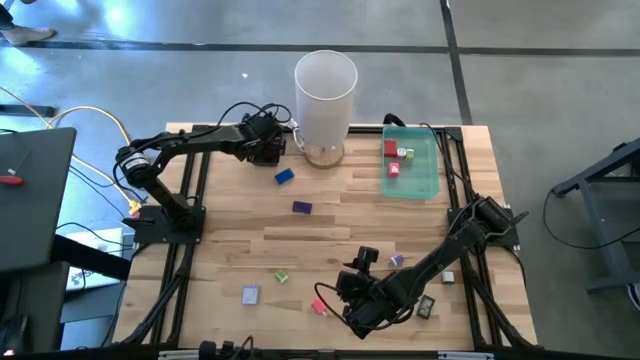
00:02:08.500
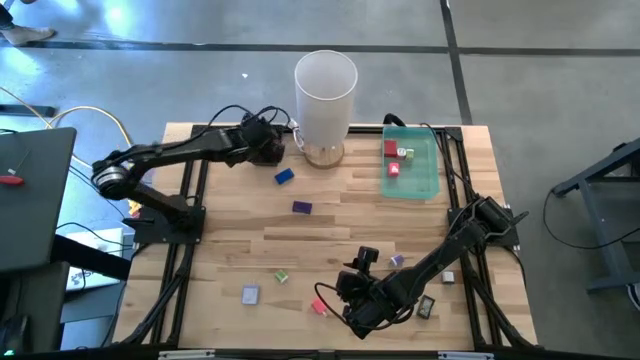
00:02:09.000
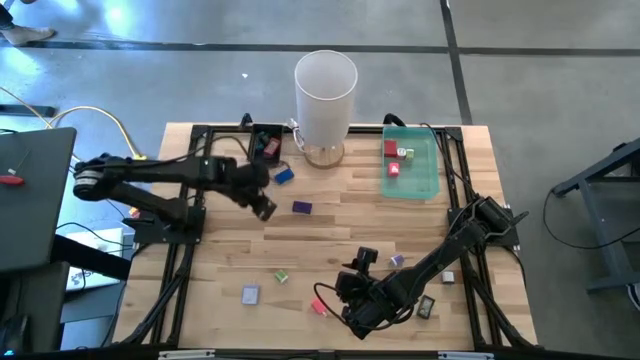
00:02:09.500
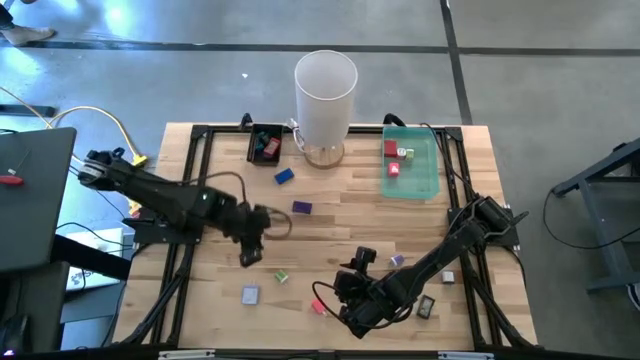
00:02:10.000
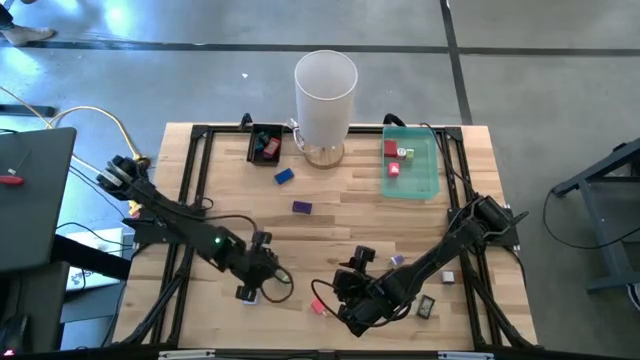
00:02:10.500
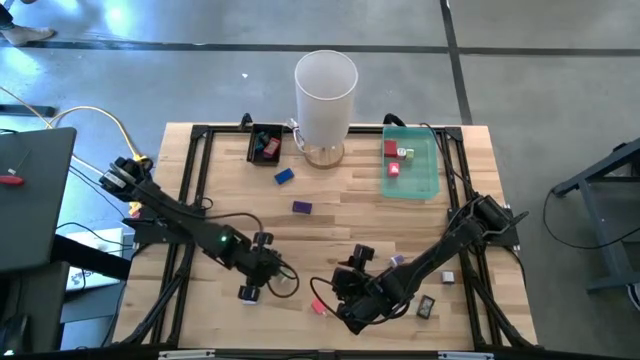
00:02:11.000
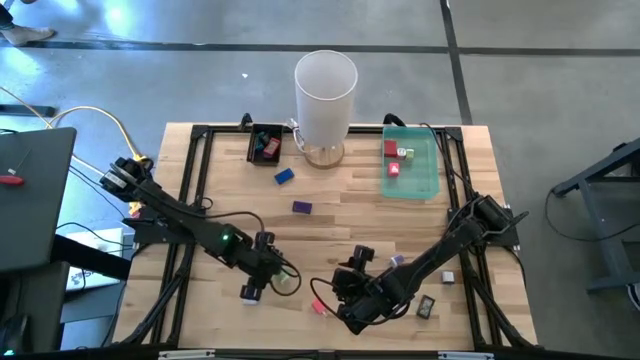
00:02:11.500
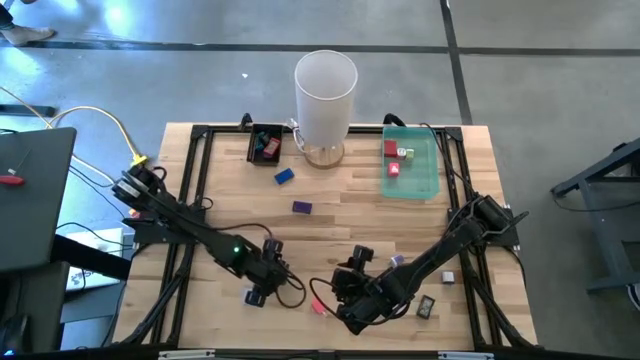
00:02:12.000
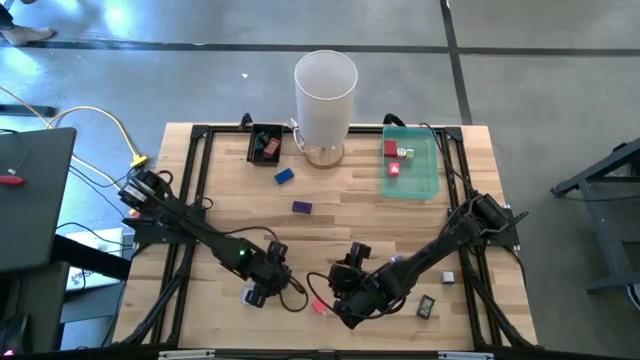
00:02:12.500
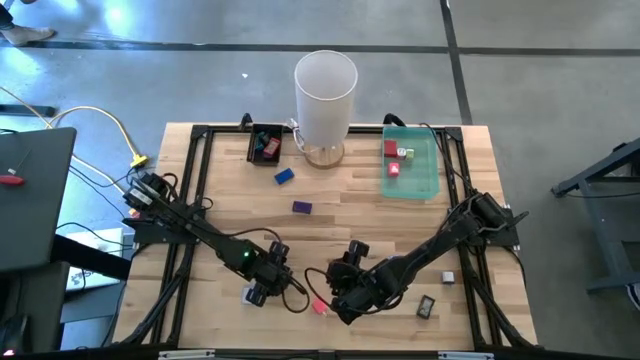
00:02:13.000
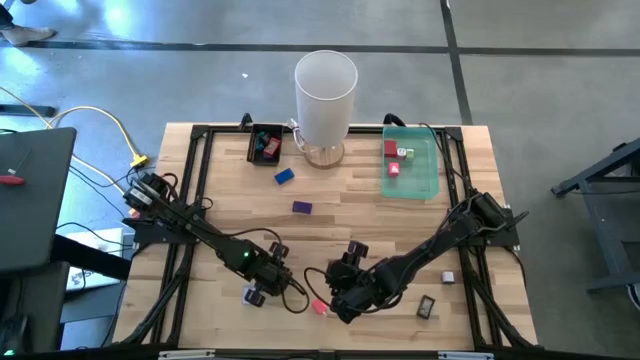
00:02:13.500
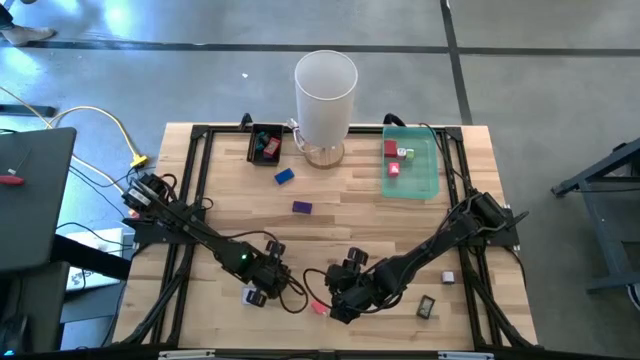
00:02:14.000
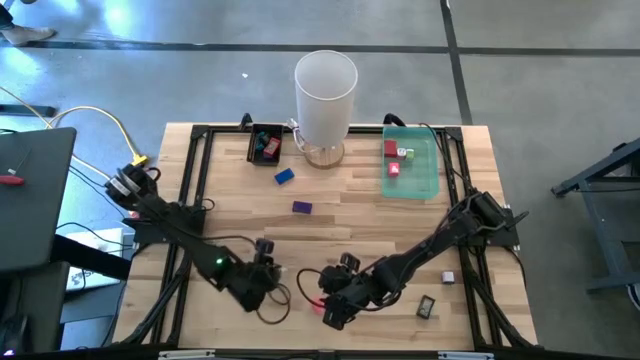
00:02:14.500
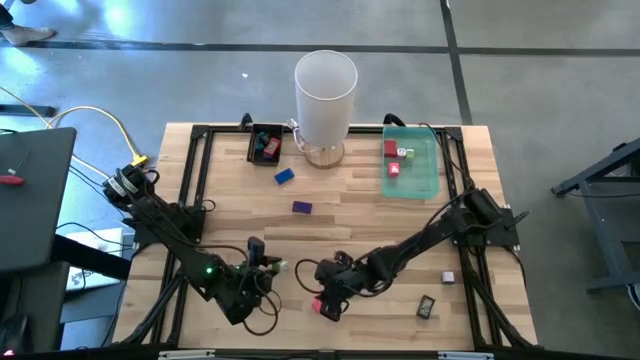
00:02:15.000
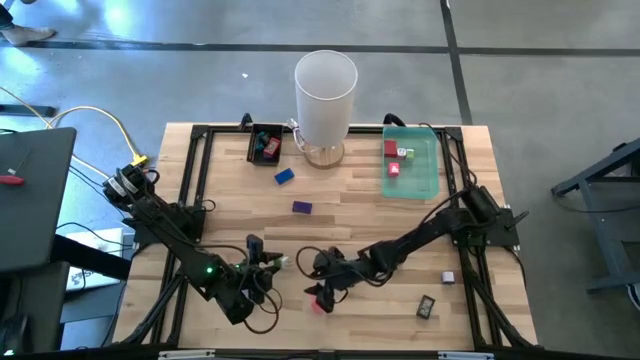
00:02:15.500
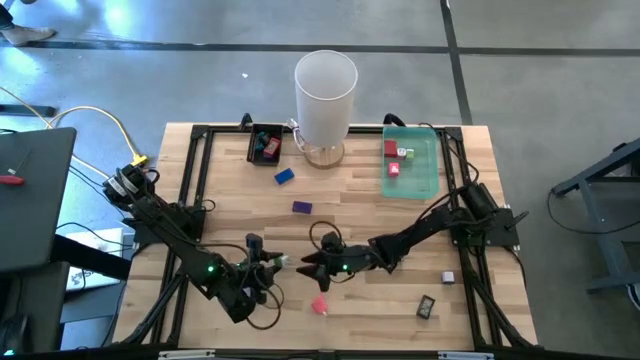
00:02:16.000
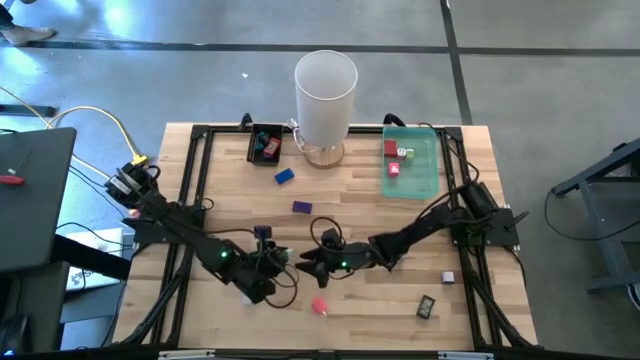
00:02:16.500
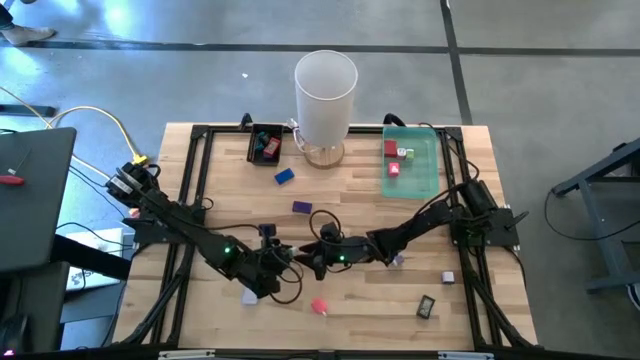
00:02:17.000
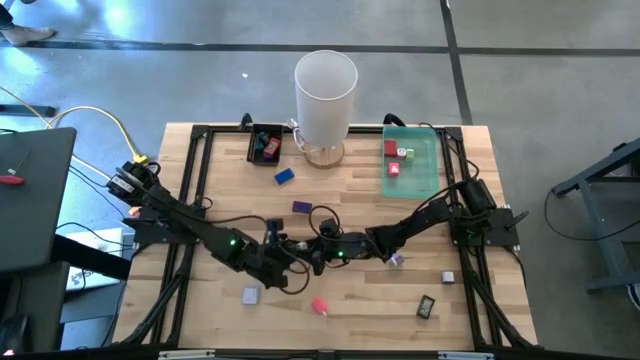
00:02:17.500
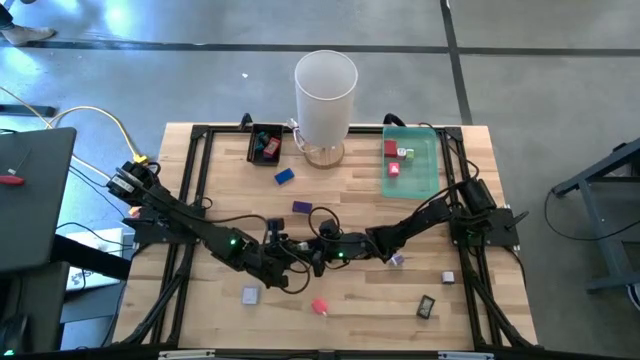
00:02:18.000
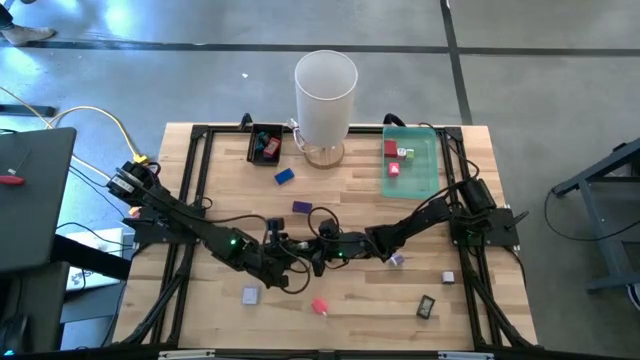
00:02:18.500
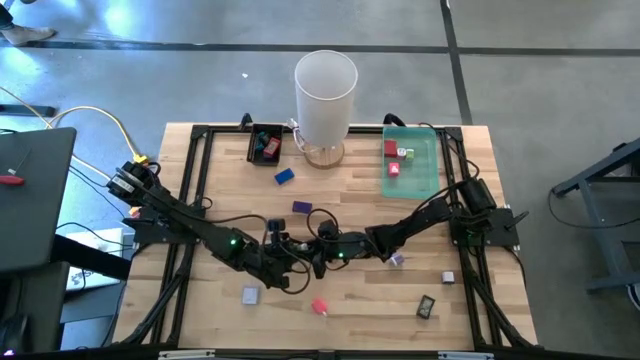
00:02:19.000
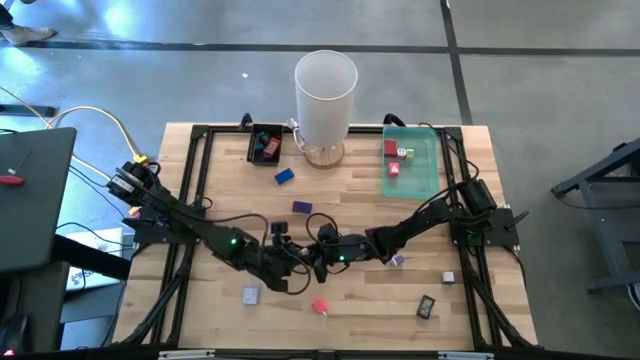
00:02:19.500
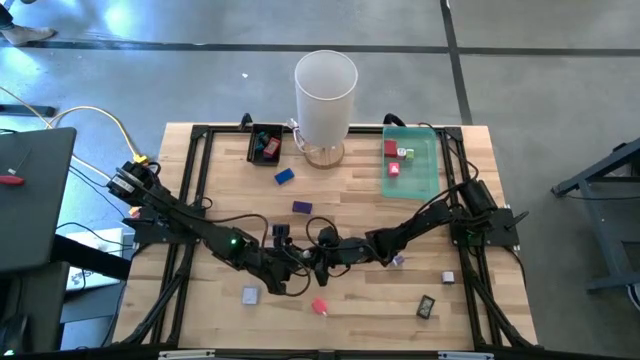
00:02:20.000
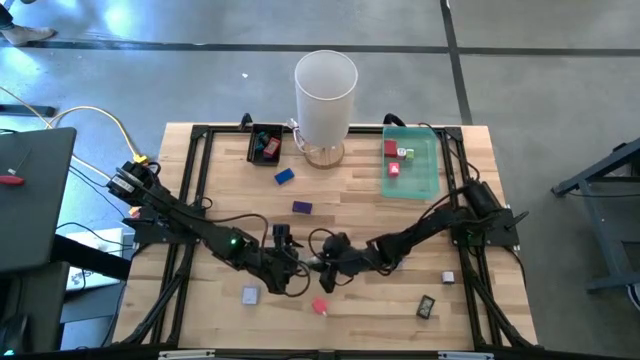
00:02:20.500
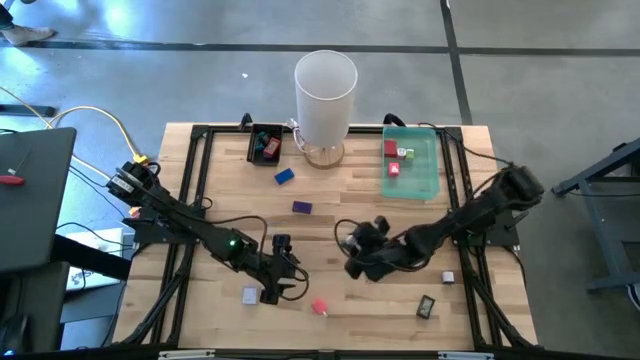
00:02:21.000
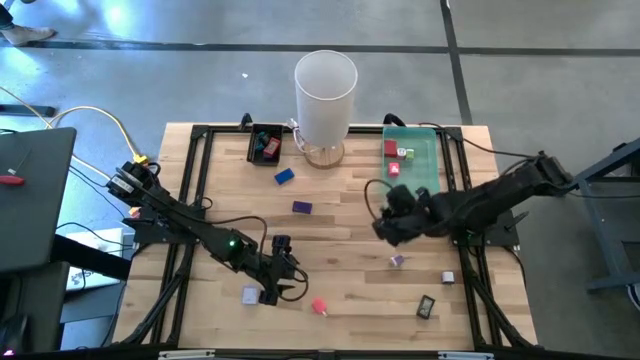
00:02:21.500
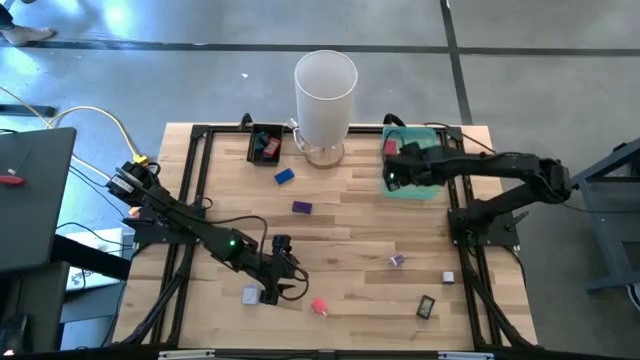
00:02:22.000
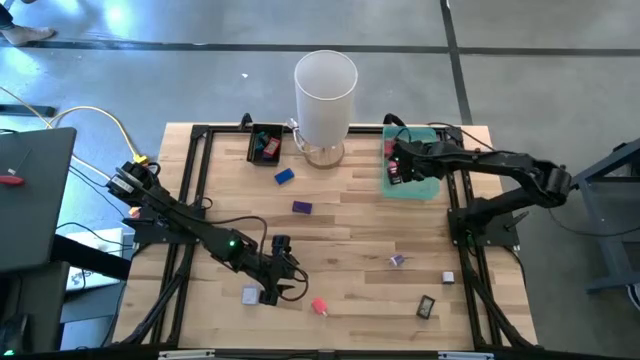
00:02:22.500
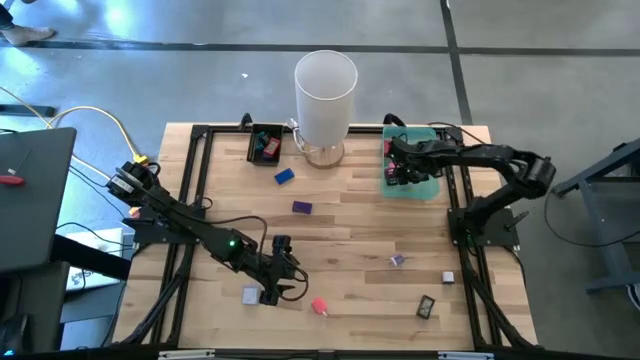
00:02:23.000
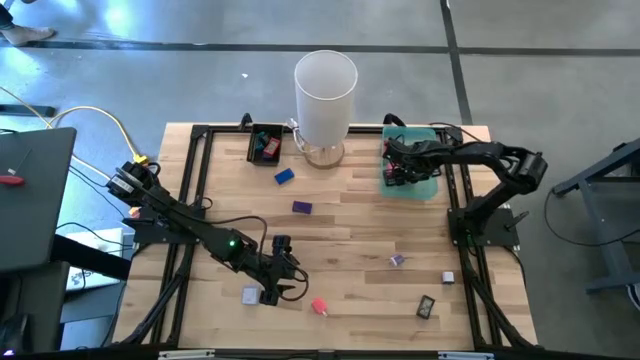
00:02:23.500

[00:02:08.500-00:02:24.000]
Task: Pick & Place Office items
Put the green white adapter into the green bin

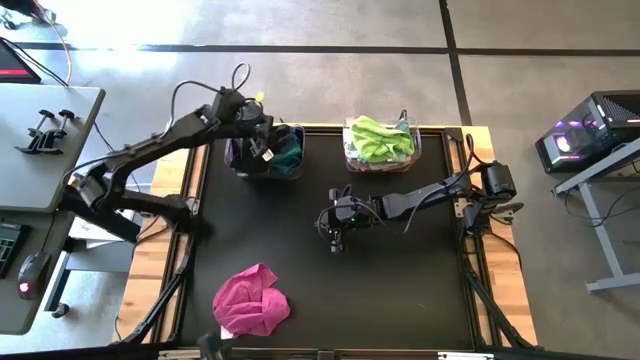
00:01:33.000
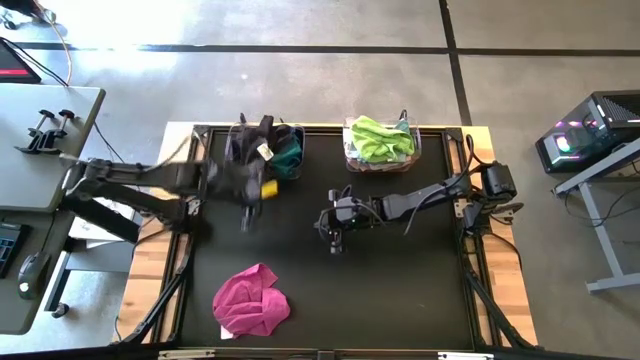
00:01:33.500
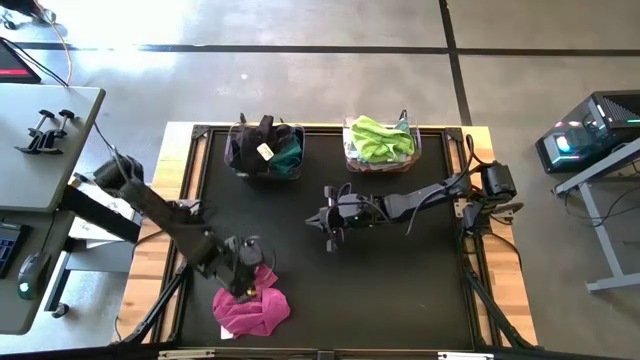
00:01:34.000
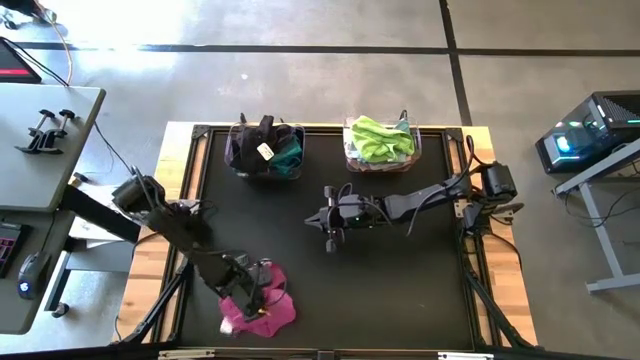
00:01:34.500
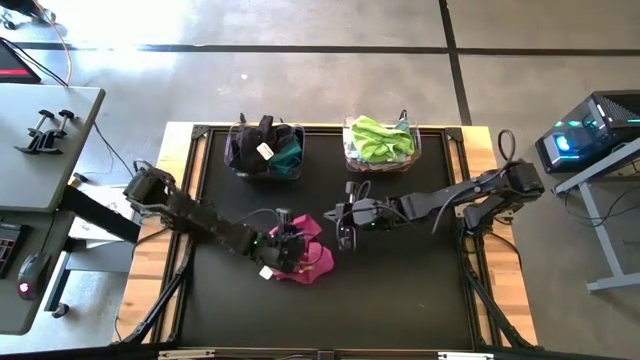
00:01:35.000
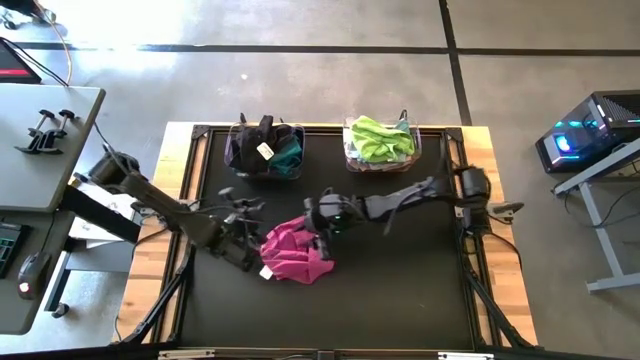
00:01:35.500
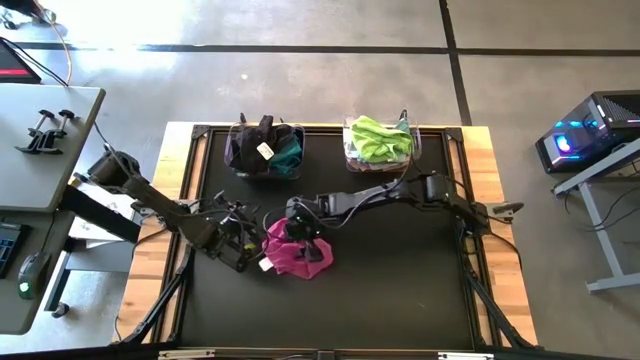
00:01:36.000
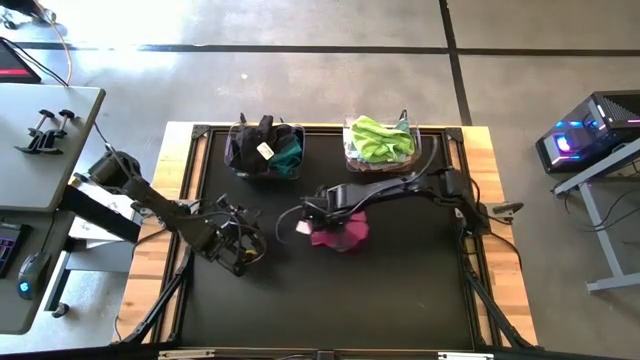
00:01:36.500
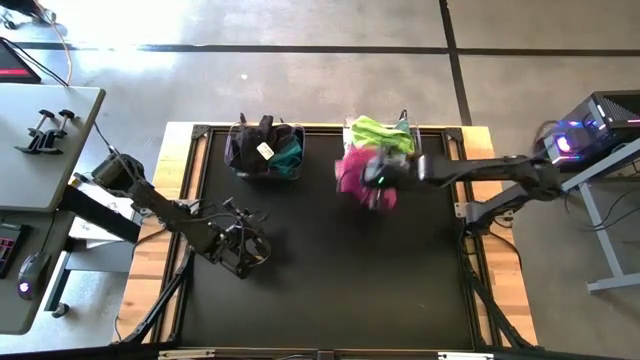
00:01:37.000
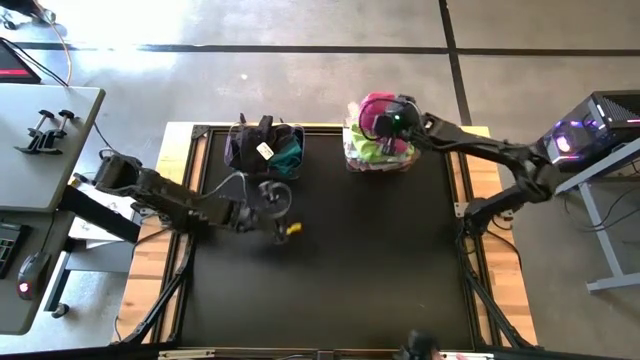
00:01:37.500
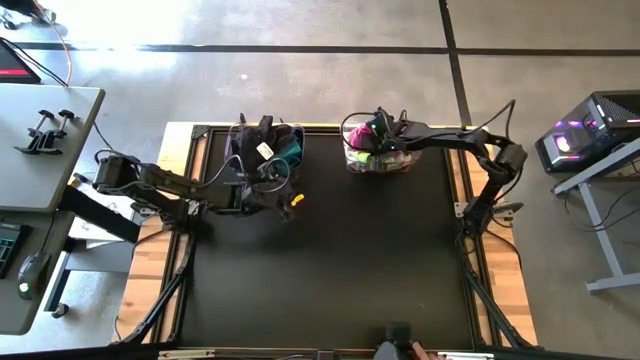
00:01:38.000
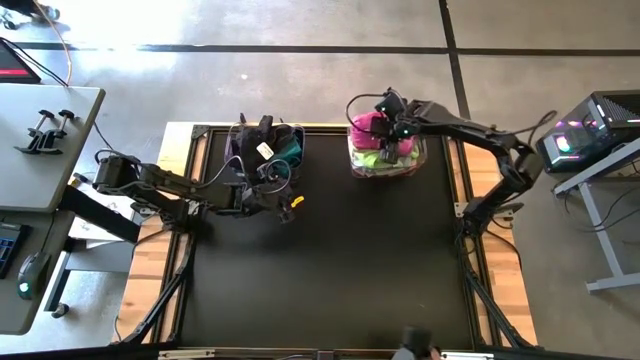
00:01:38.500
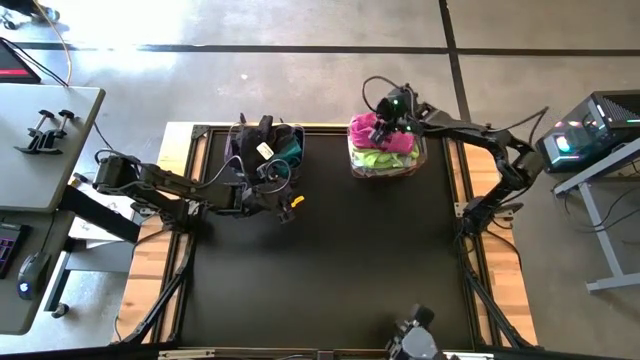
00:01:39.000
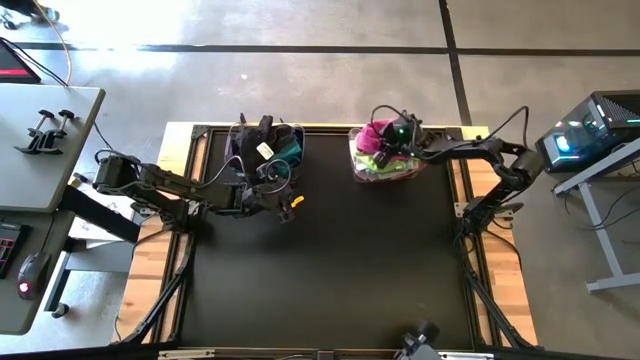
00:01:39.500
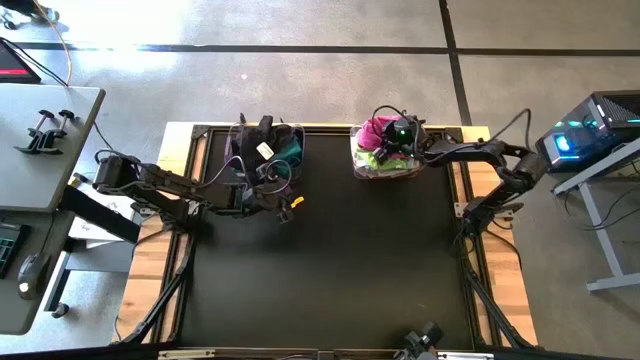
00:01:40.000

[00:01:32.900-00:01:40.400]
Task: Sort towels by color in basket
Put the pink kitchen towel into the right transparent bin

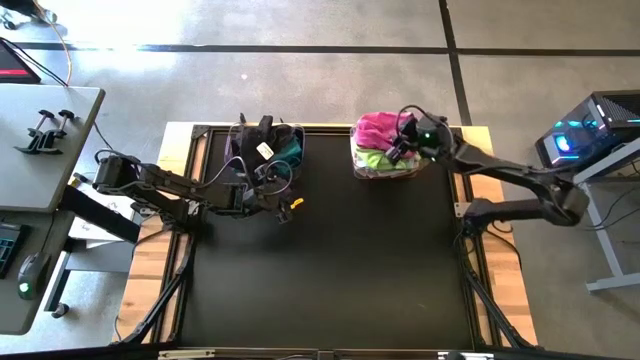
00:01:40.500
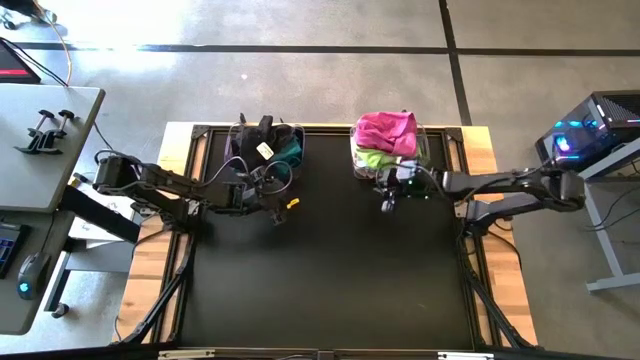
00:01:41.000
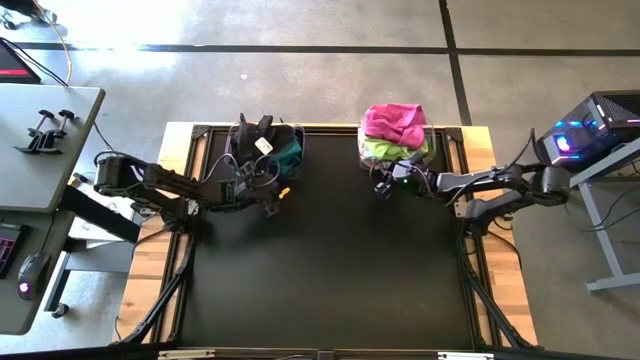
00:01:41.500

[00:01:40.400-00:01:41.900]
Adjust the left transparent bin
